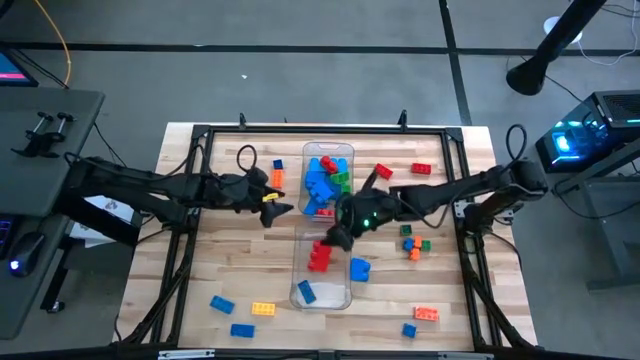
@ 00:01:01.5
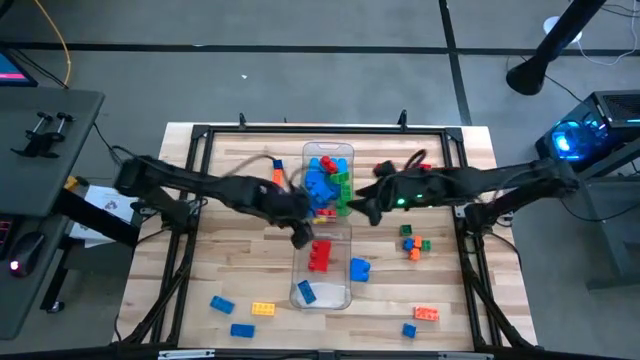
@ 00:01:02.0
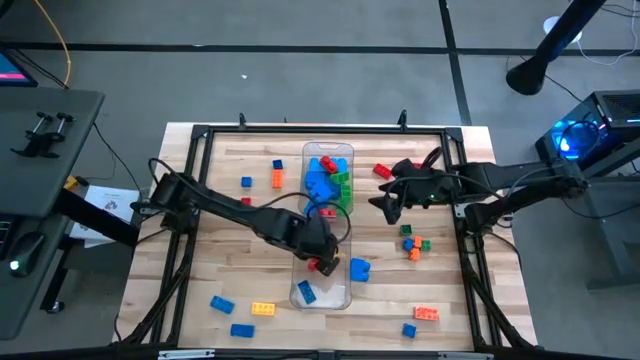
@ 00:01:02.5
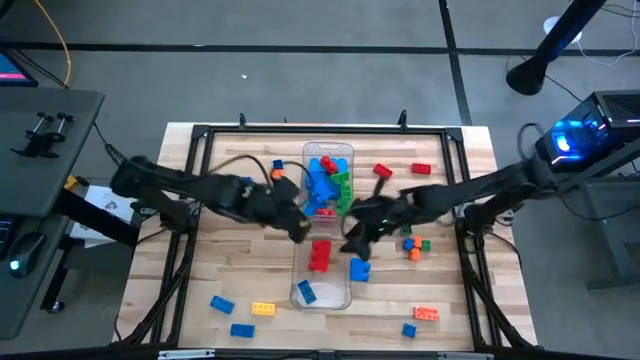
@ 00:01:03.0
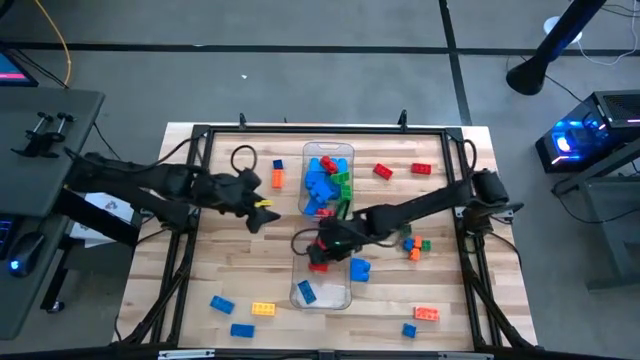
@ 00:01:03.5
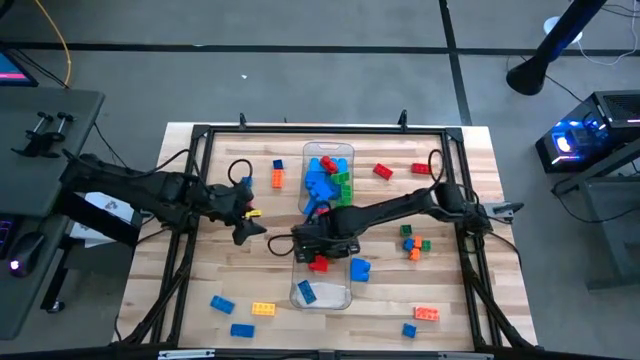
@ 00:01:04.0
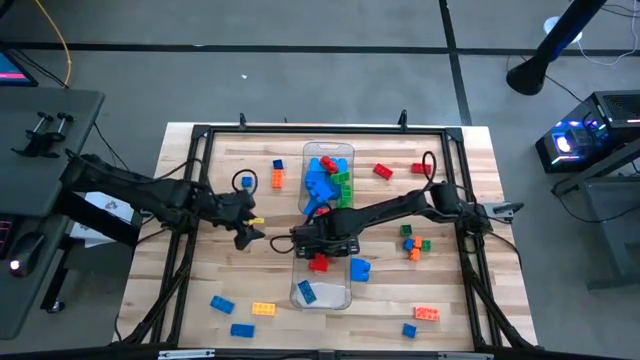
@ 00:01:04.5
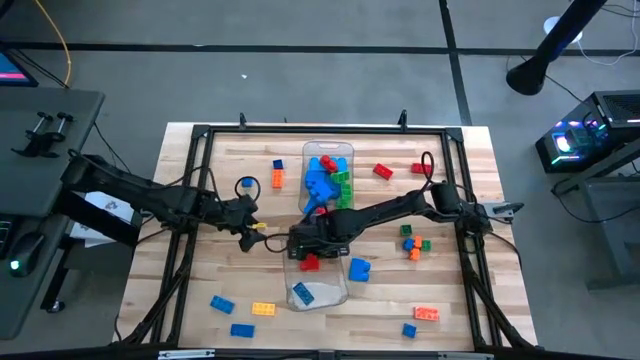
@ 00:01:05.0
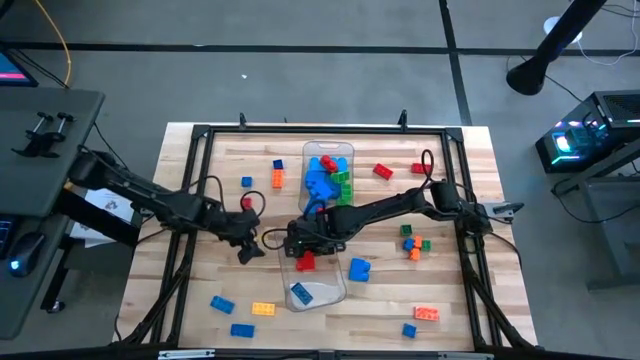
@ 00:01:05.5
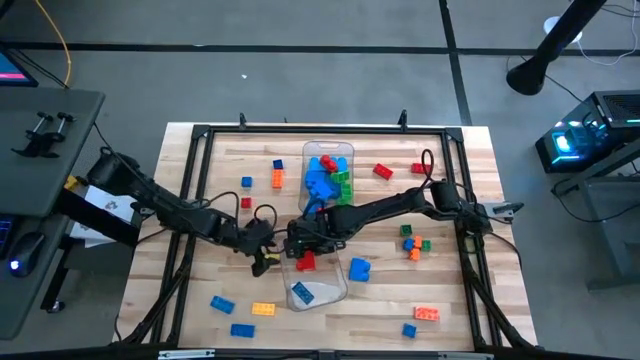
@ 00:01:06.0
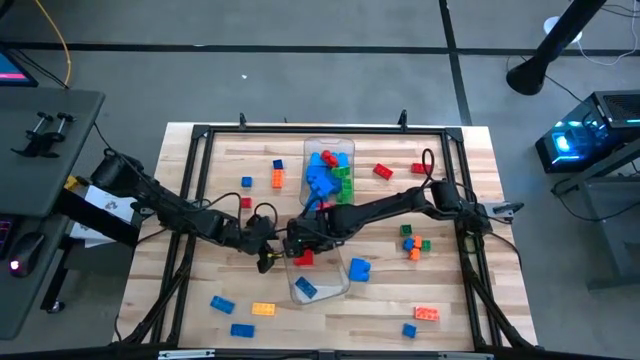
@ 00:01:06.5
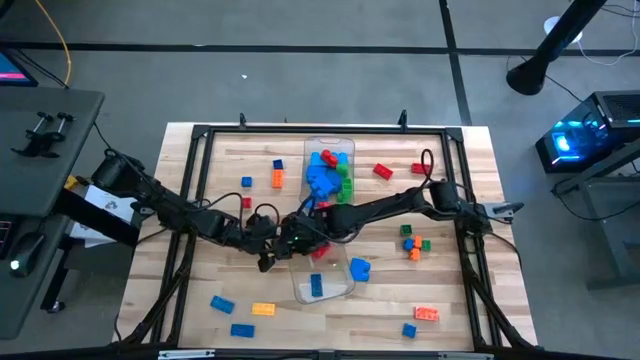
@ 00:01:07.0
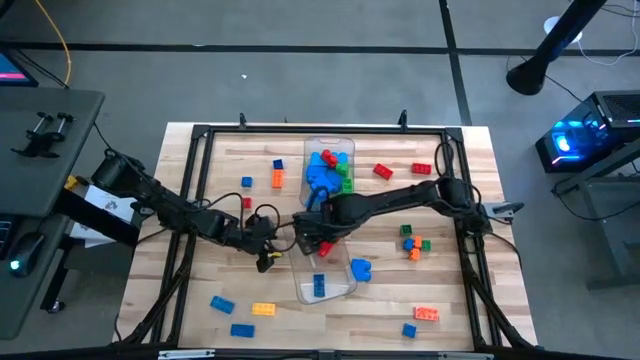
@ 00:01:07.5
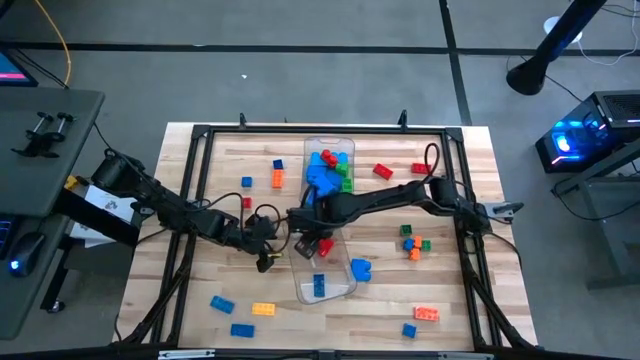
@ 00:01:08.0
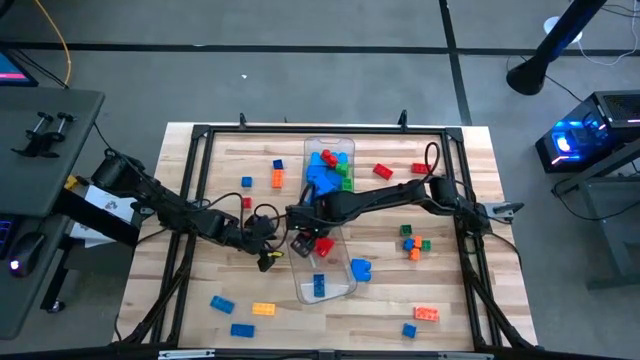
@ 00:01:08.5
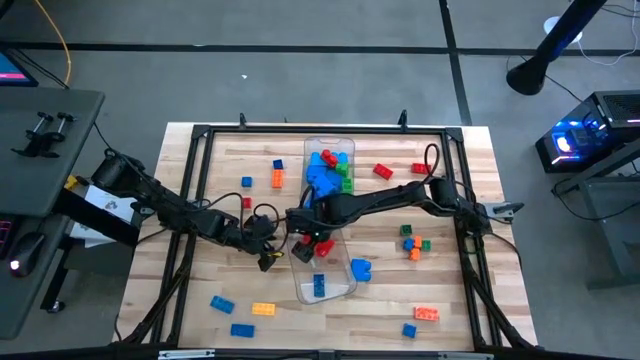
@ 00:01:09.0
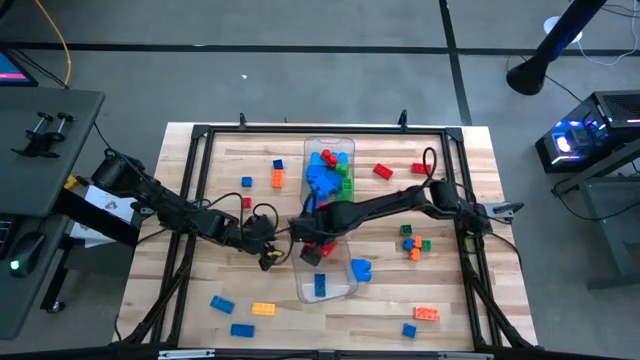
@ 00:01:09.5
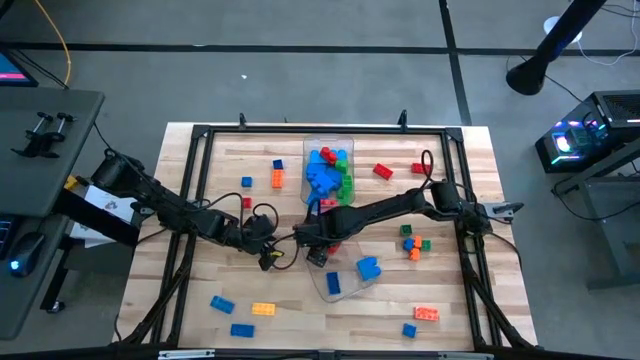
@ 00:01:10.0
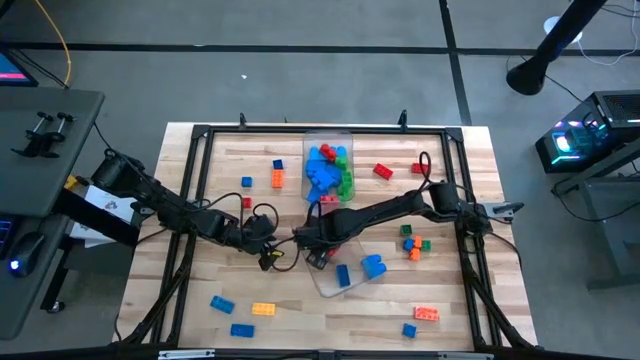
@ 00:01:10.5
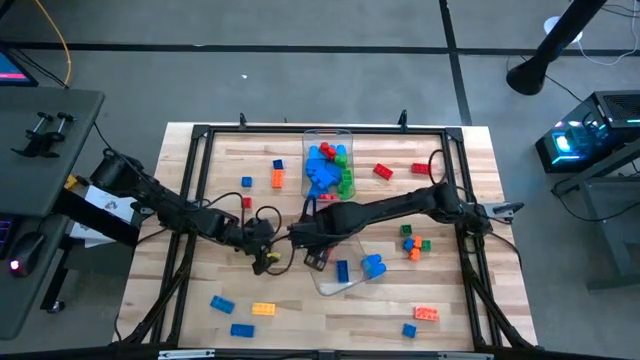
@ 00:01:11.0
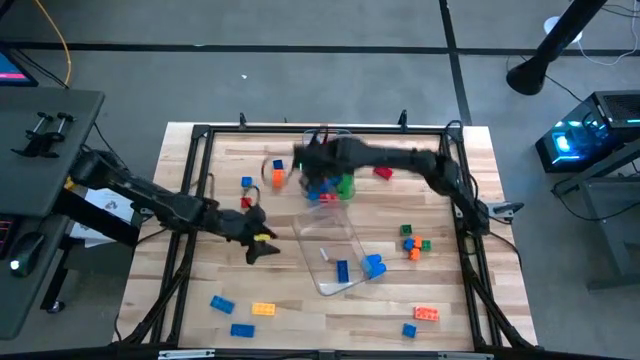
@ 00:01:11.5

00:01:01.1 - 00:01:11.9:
Task: Sort blocks by size
Put the large red game piece in the top transparent bin

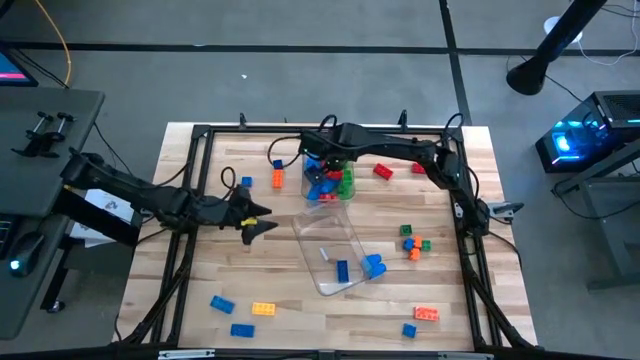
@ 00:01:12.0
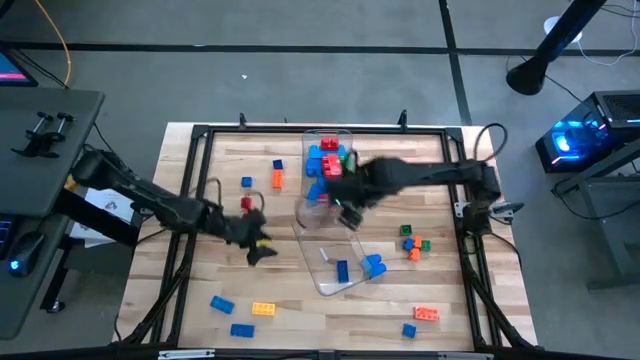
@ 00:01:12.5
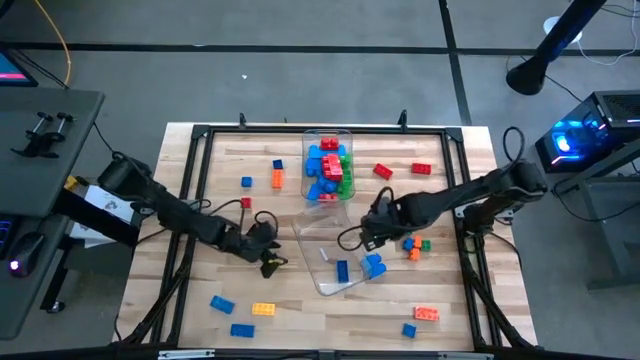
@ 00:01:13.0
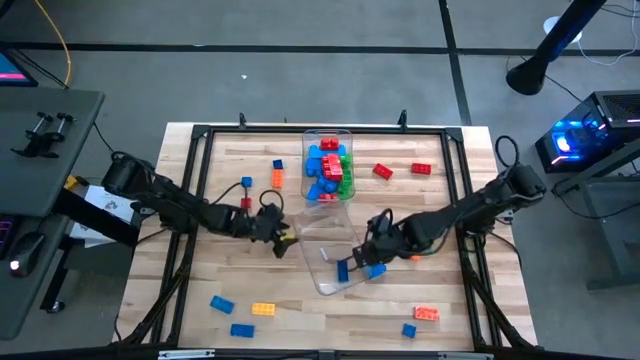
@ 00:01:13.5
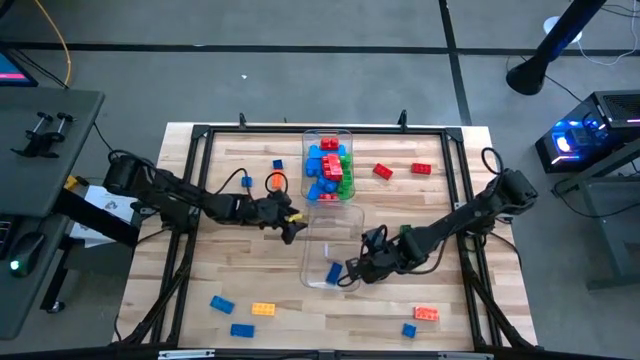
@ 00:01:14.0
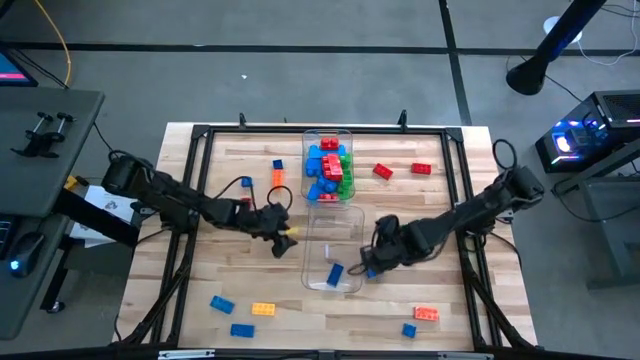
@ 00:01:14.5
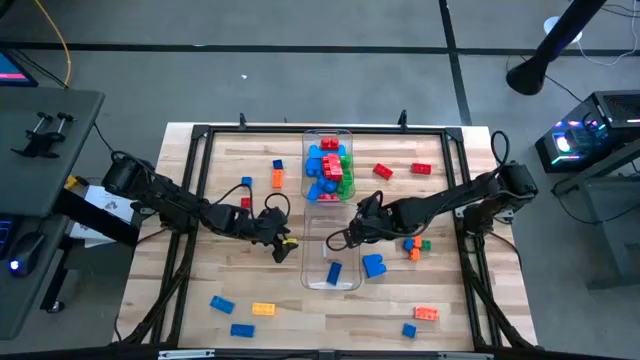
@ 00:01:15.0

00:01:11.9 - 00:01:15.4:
Move the item to the bottom transparent bin to the left

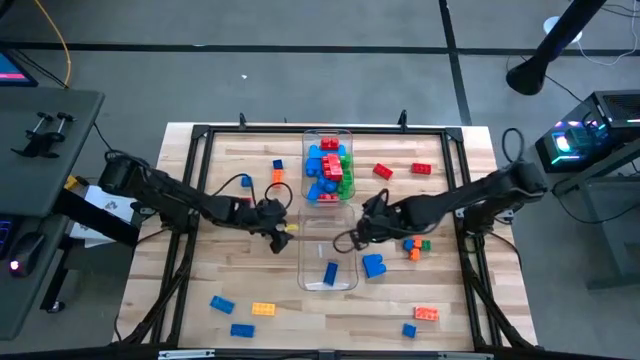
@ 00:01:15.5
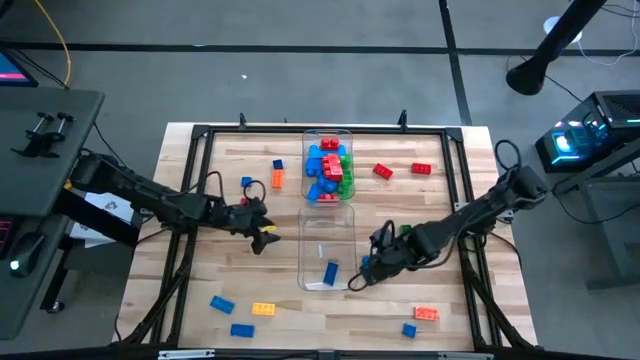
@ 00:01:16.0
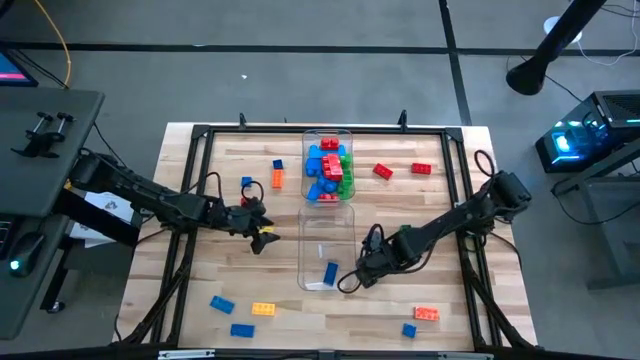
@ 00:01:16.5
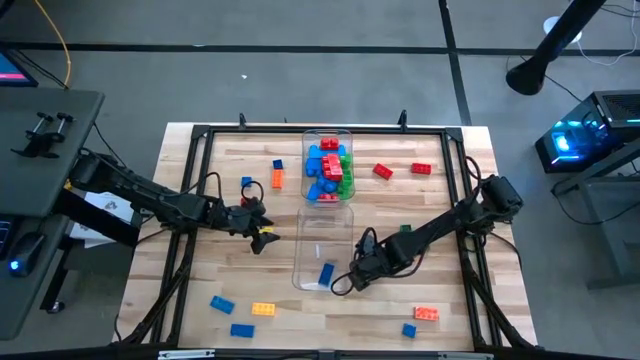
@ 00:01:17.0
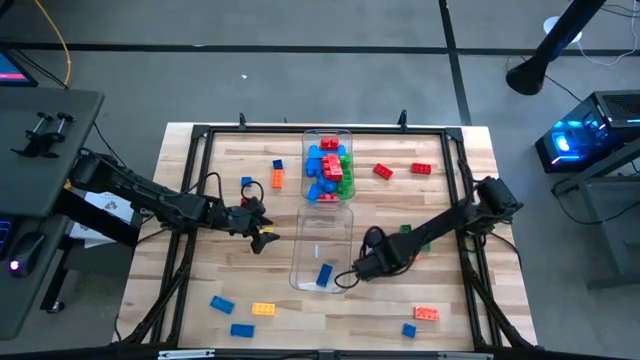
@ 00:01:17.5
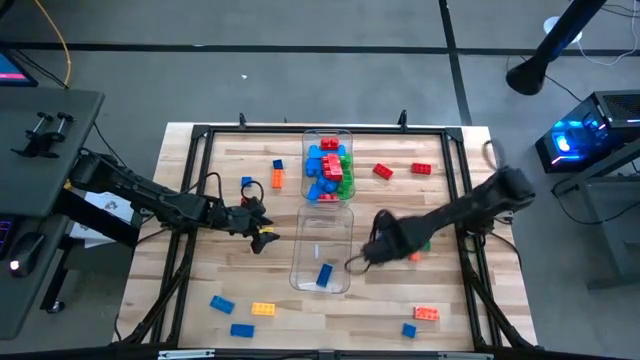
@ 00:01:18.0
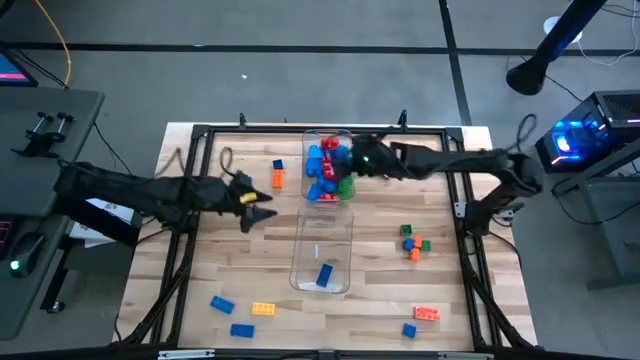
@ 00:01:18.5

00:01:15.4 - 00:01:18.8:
Put the large blue game piece in the top transparent bin

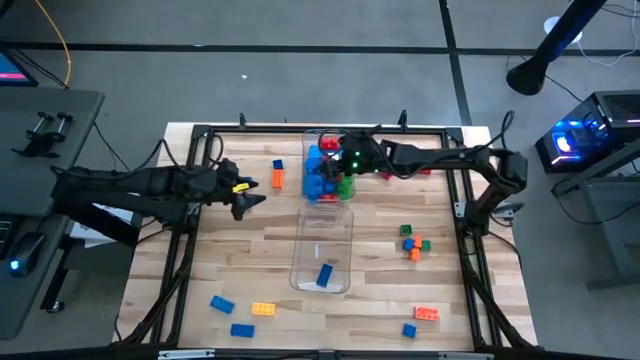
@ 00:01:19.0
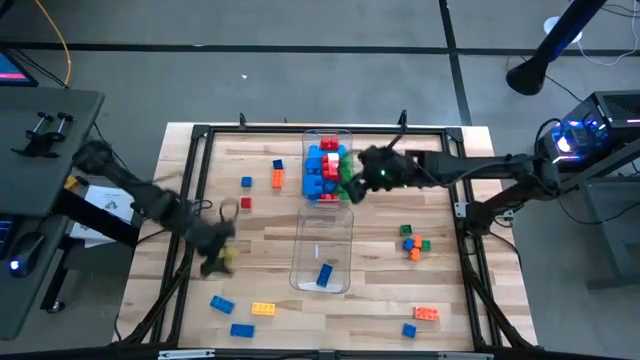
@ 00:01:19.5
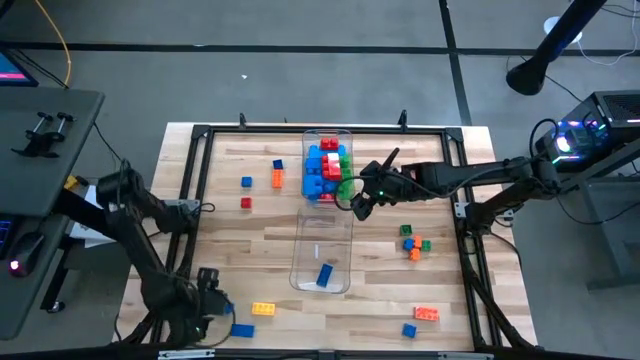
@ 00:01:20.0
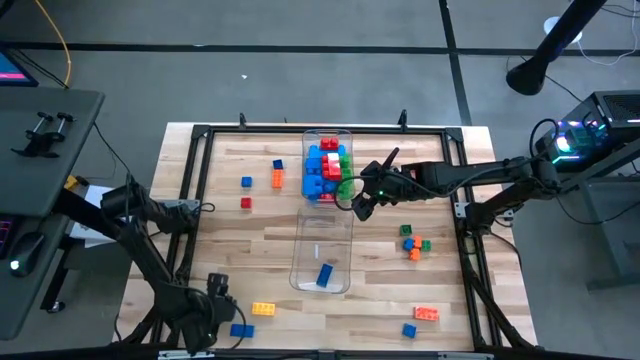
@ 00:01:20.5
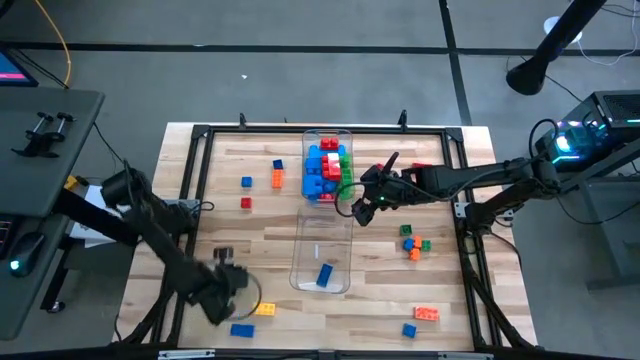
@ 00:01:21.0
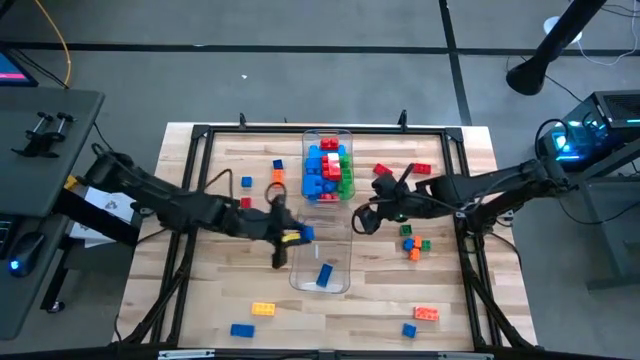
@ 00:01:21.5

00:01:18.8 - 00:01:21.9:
Put the small blue game piece in the bottom transparent bin
